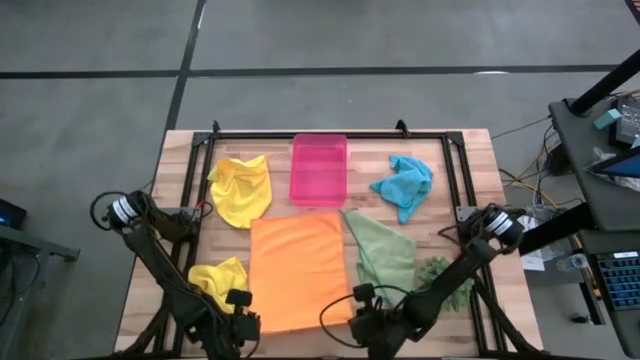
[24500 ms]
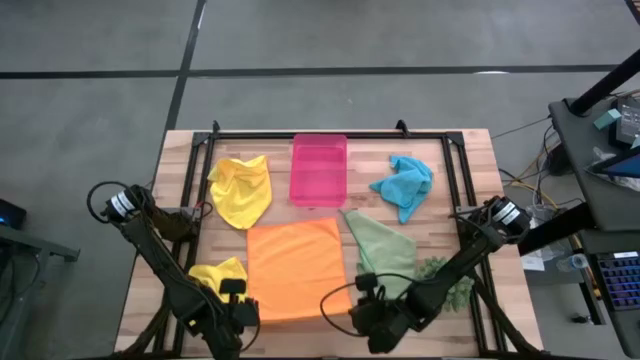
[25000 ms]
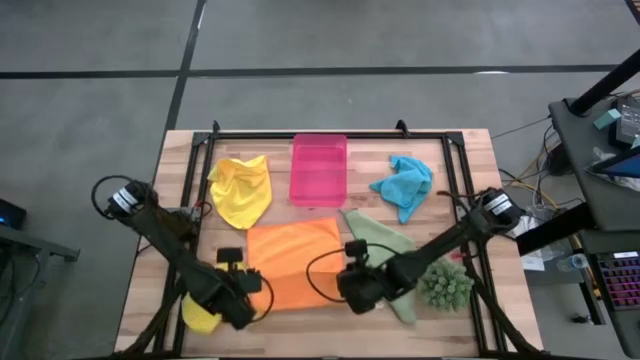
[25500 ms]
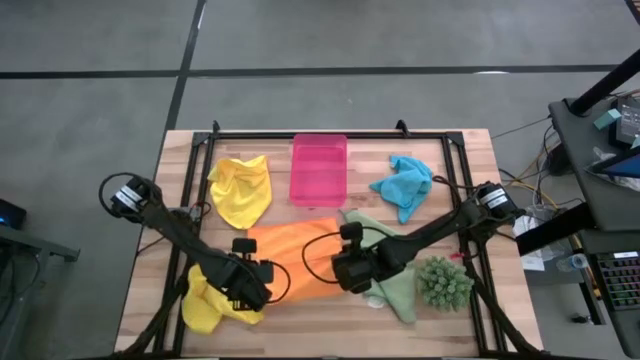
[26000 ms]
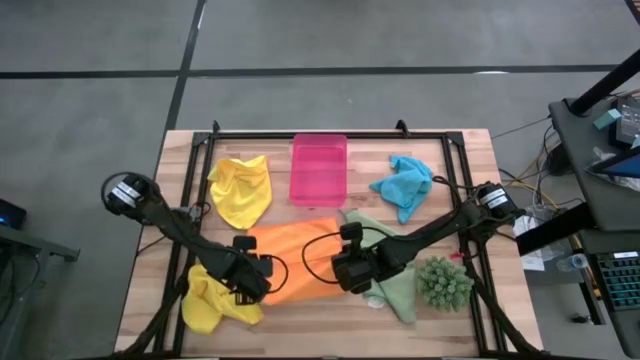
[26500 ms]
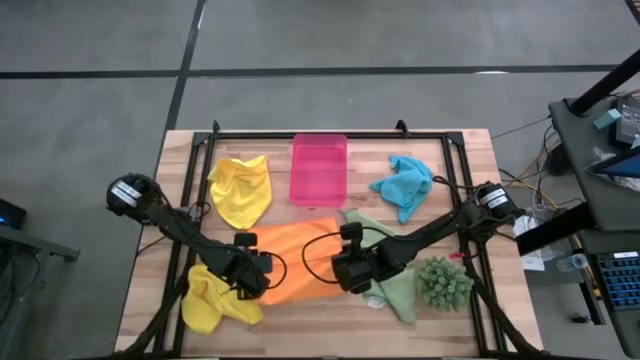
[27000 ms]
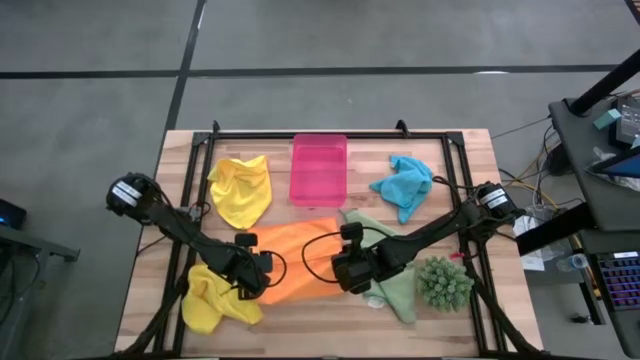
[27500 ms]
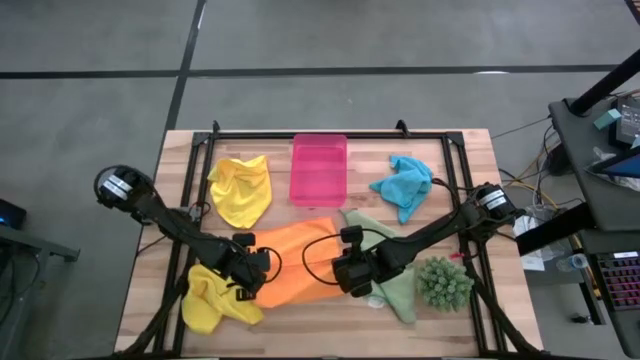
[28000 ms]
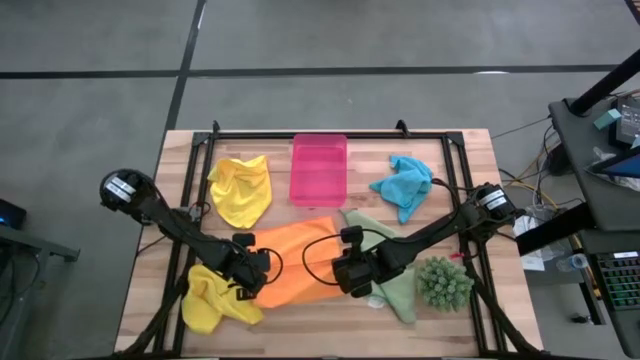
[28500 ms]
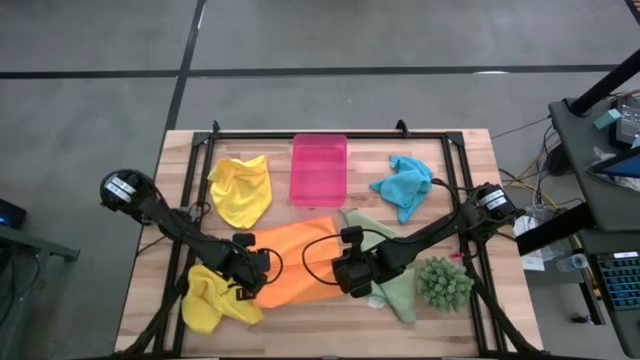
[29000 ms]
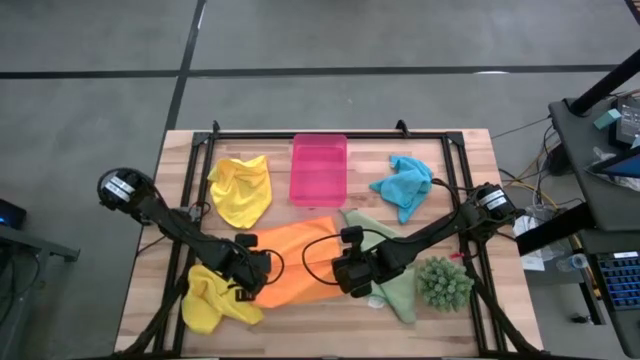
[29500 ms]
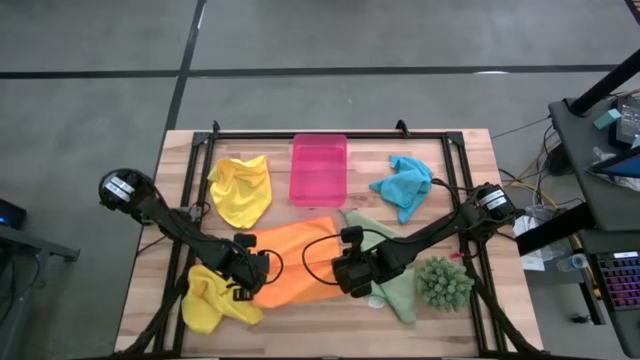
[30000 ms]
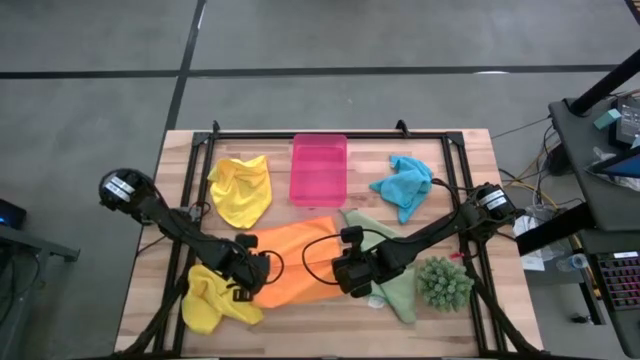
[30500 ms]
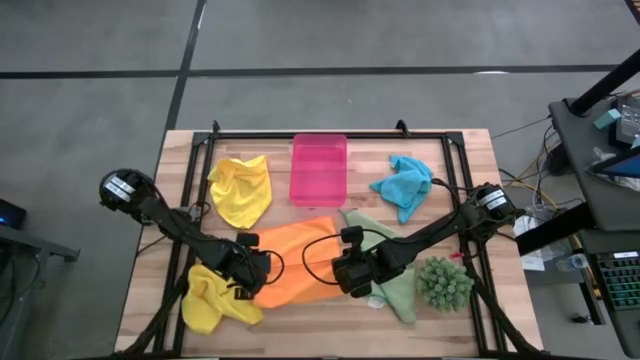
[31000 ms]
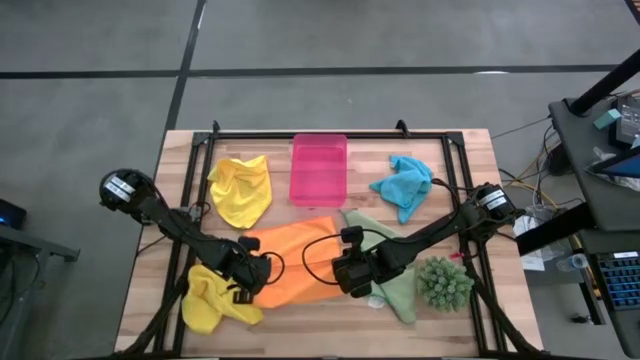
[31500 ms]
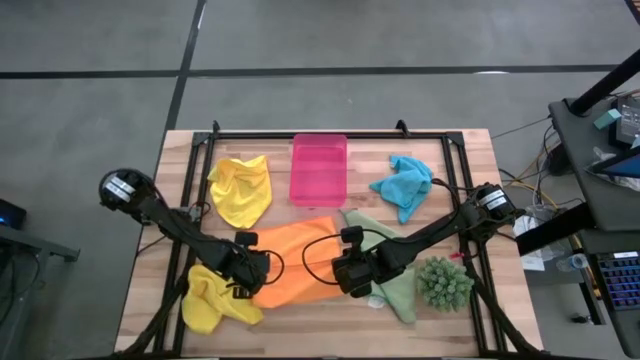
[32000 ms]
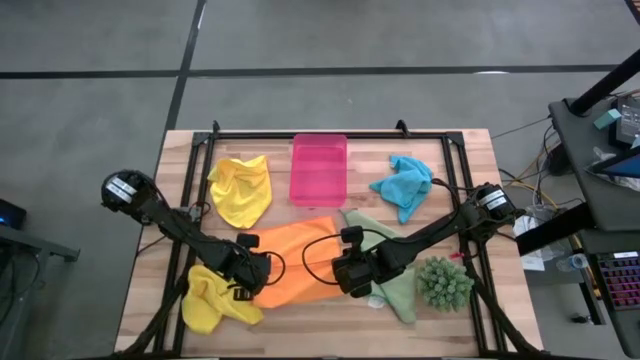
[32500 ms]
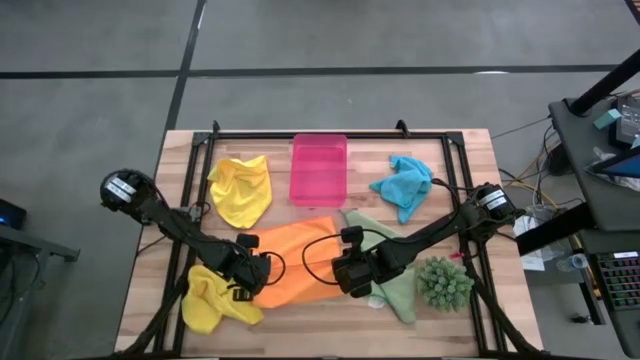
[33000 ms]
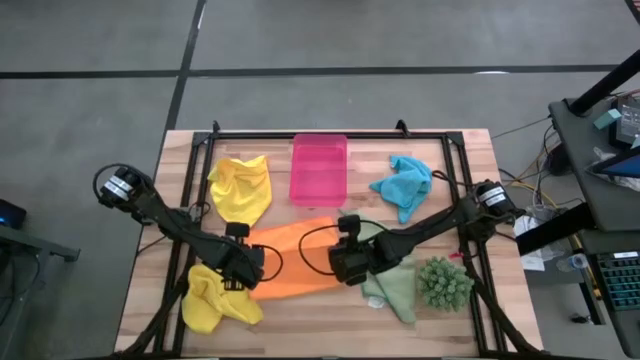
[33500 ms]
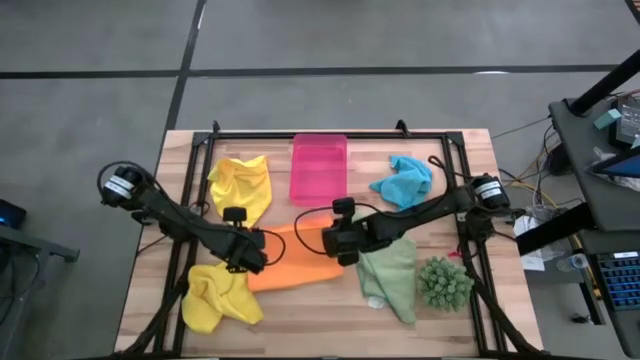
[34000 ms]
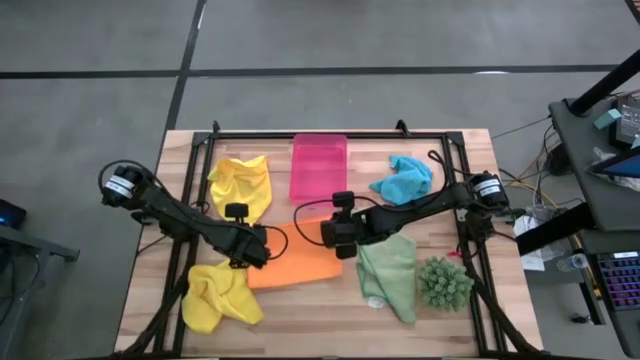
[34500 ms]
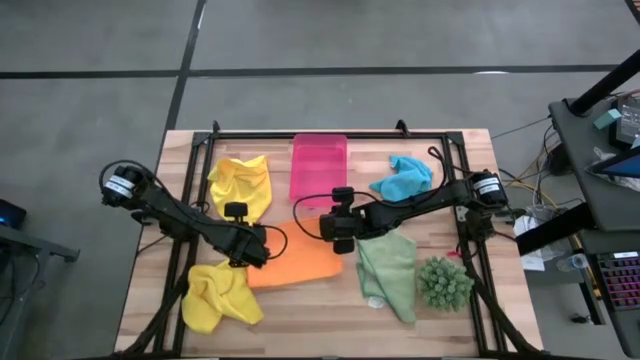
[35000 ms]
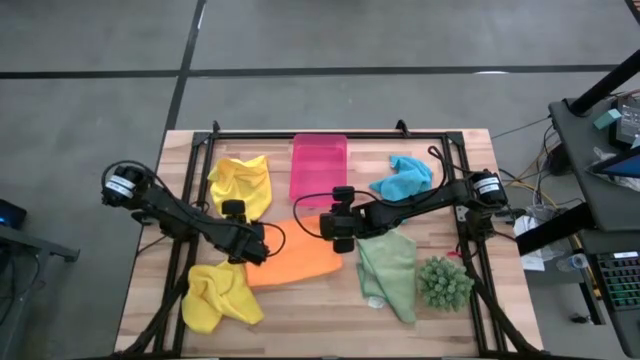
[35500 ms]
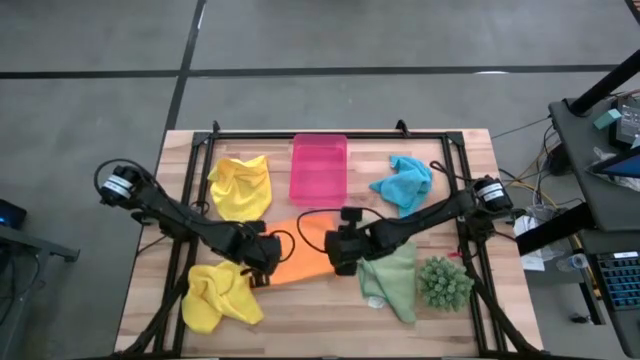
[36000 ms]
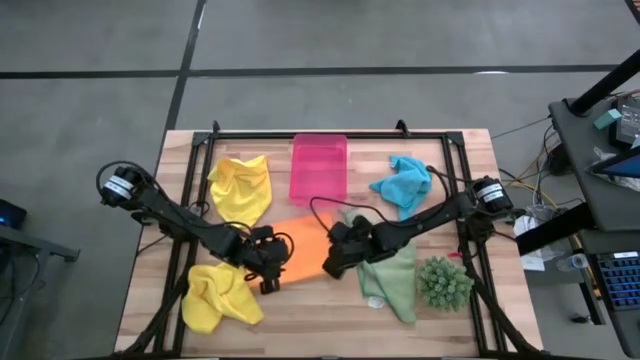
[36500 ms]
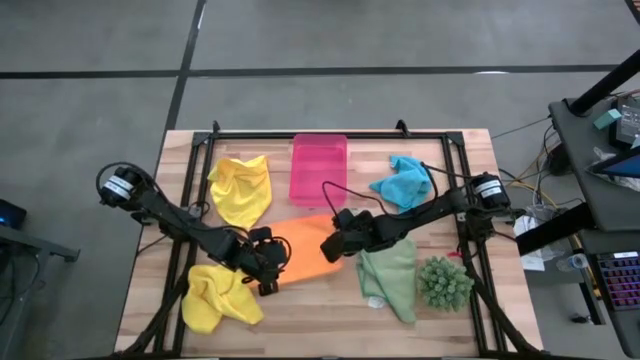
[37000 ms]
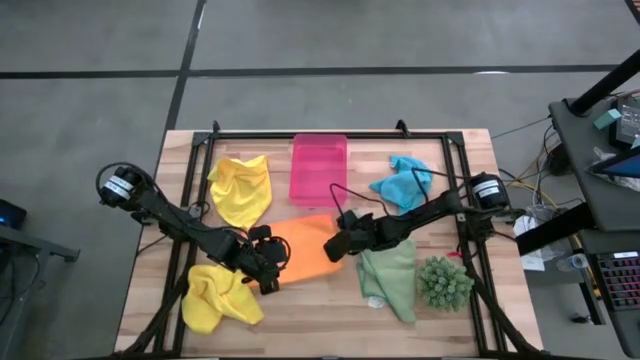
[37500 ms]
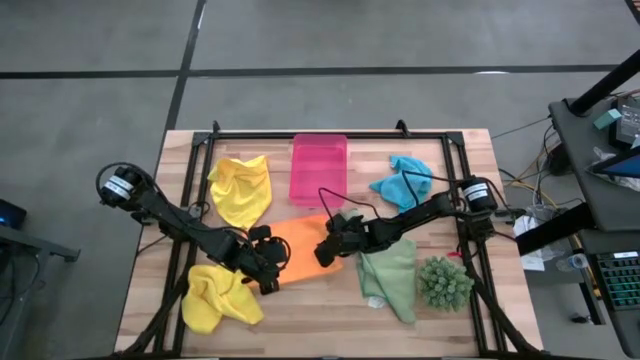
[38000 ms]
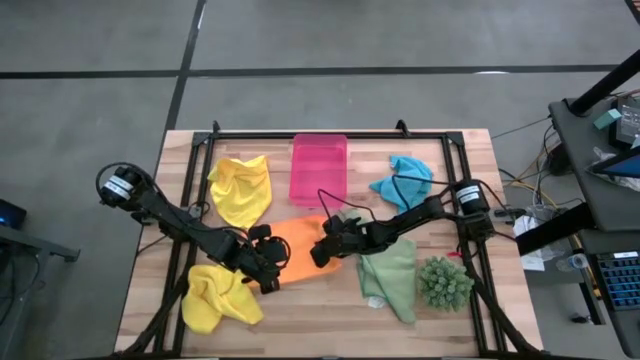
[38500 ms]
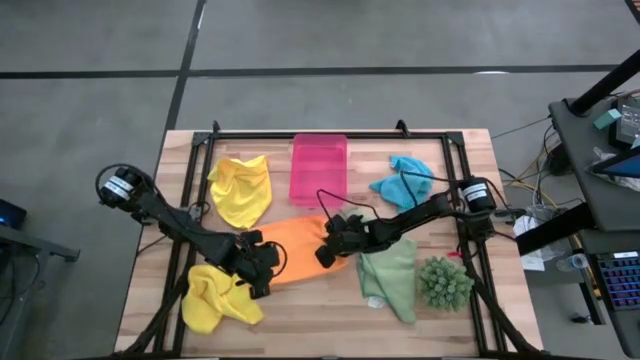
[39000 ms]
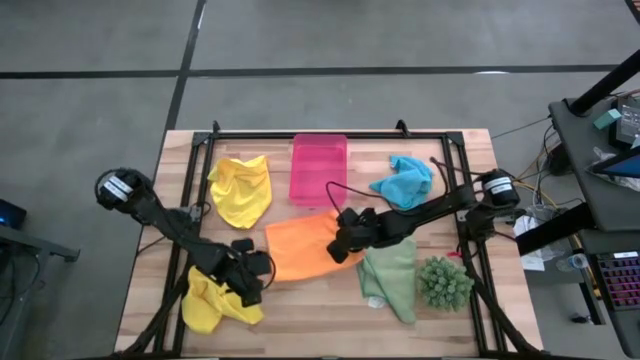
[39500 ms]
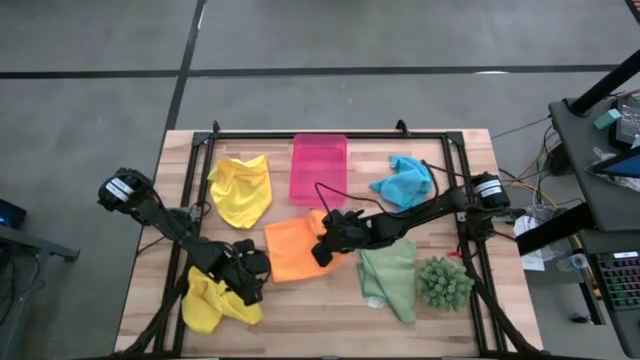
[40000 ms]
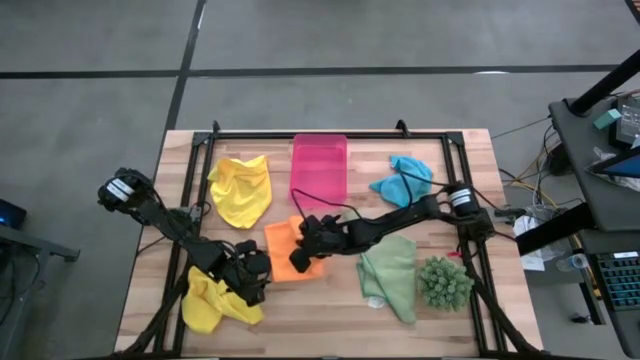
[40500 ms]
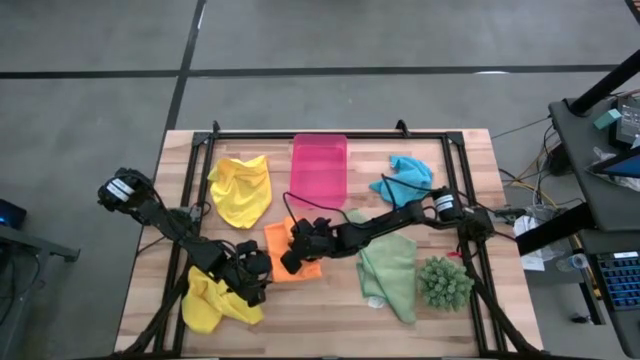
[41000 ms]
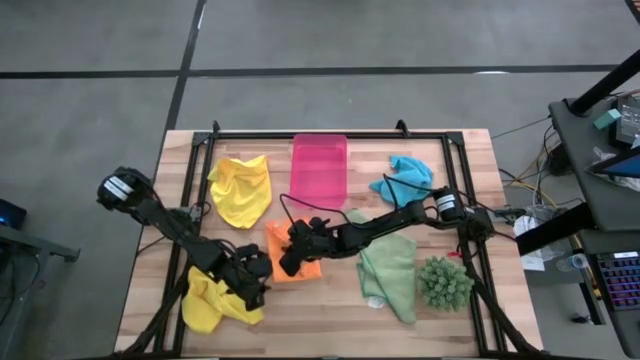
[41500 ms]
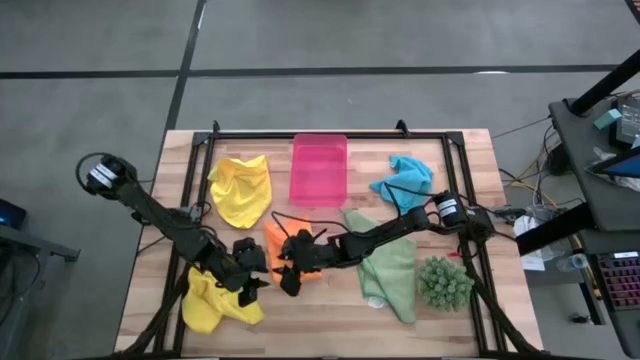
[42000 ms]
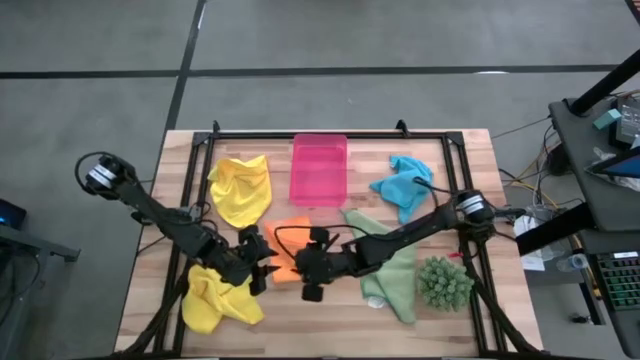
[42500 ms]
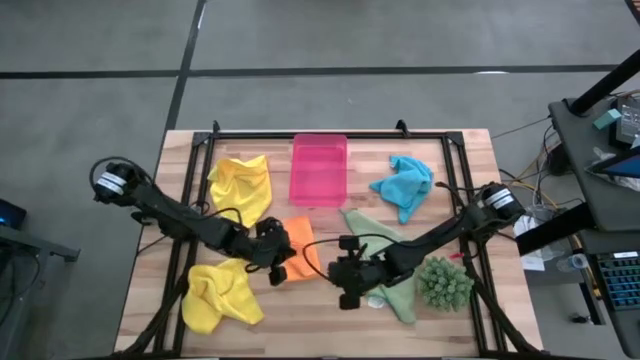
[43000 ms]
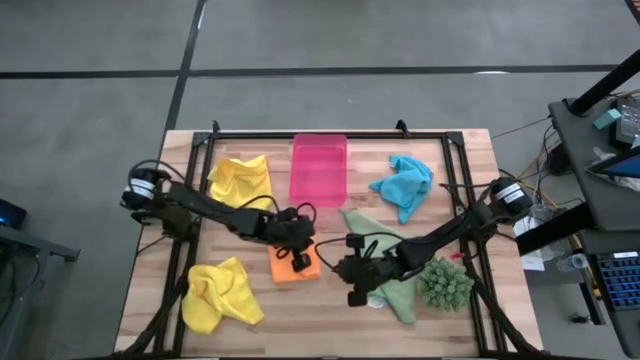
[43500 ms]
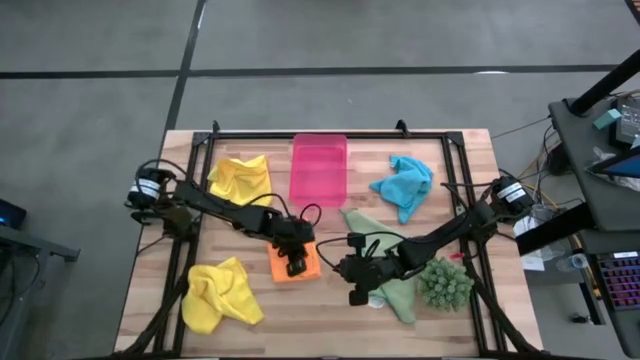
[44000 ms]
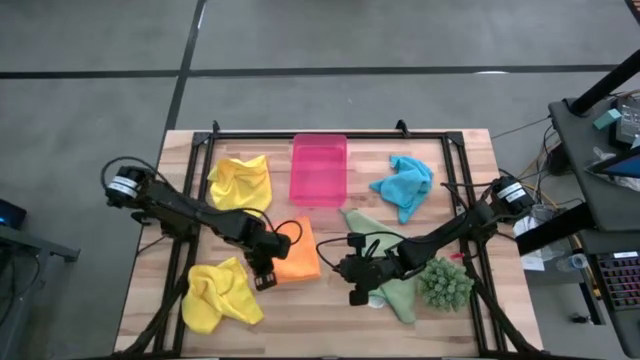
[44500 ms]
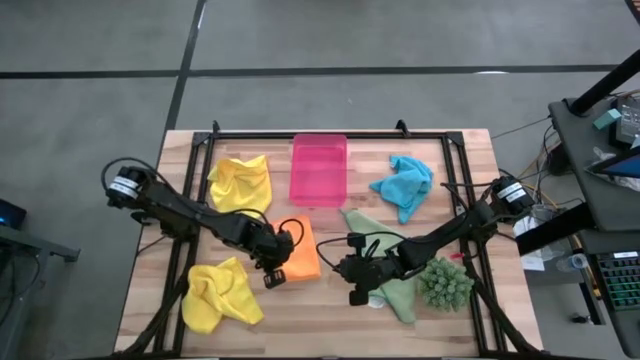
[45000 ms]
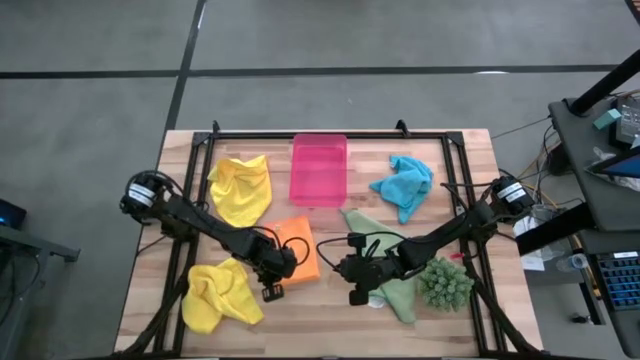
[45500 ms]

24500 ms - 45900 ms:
Task: Fold microfiber towels
Fold the orange towel
